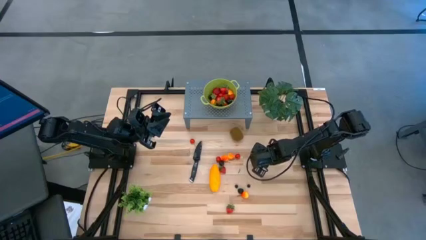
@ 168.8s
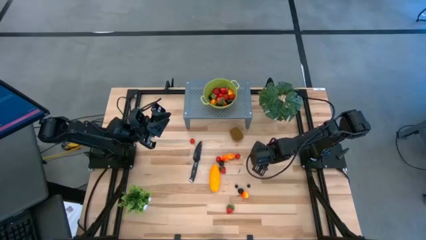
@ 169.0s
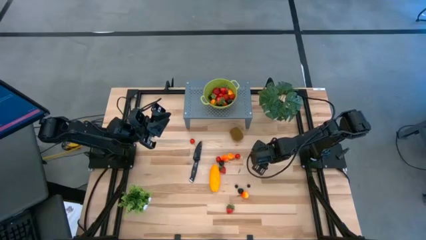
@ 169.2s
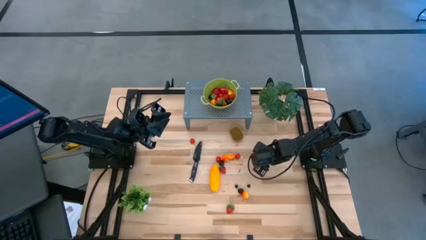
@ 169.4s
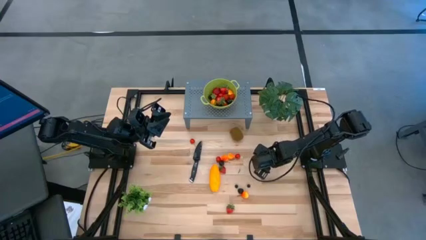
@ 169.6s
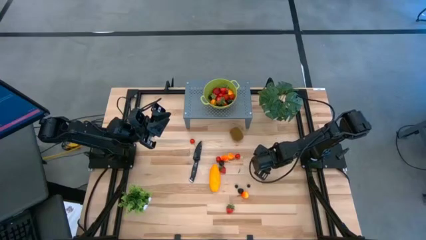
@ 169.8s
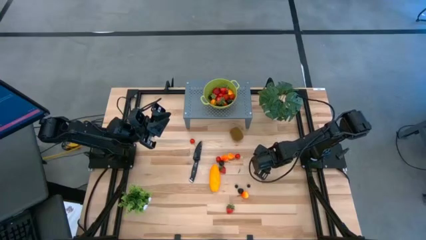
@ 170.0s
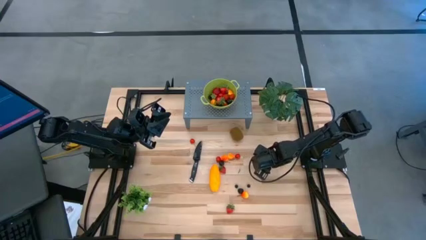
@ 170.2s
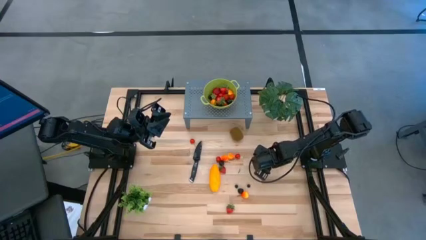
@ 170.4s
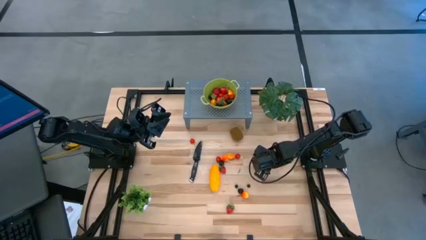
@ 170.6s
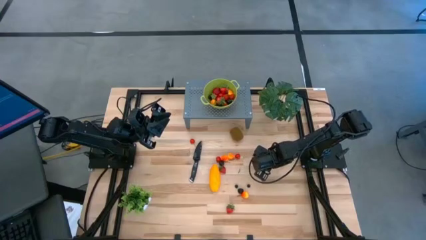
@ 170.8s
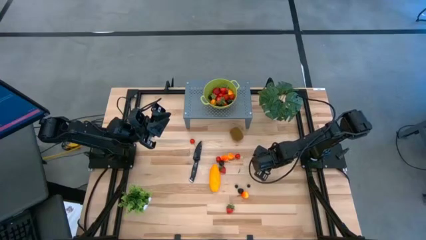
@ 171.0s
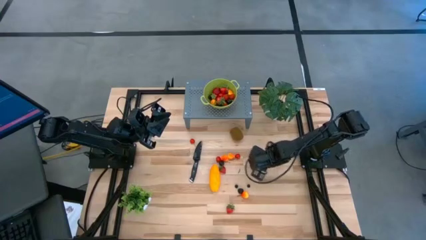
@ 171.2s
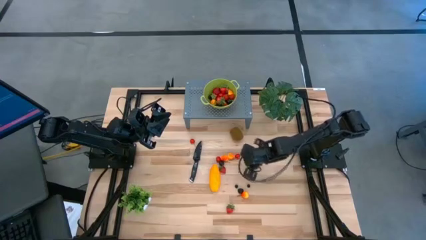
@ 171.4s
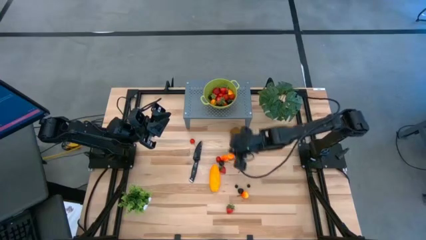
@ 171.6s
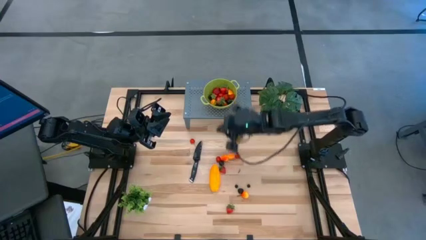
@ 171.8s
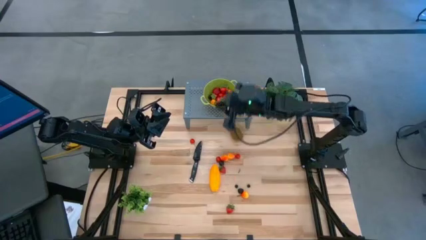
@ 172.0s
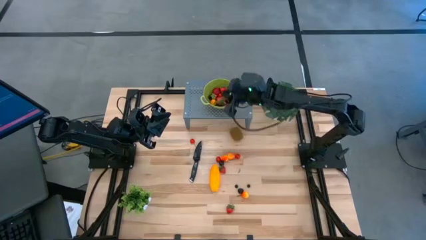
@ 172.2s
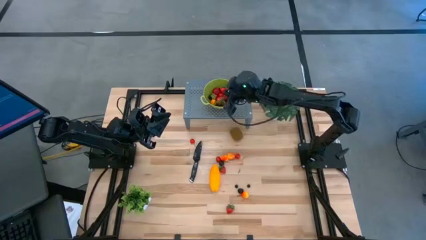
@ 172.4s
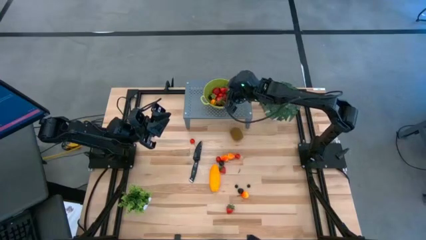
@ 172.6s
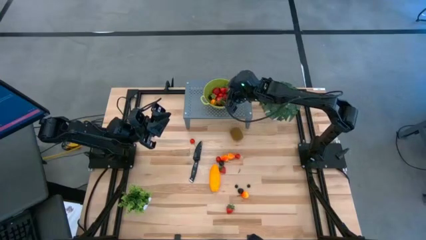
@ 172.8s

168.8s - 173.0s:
Task: Pick & Place Fruit
Put the blueberry into the green strainer bowl on the shelf

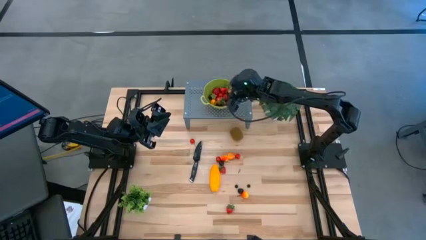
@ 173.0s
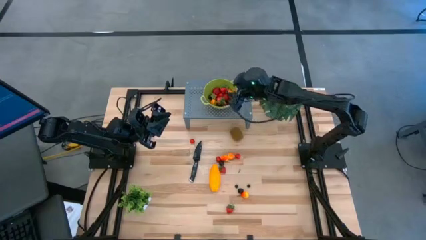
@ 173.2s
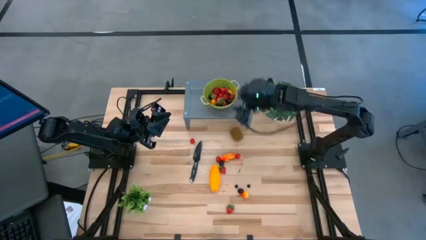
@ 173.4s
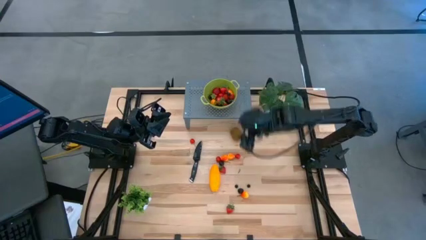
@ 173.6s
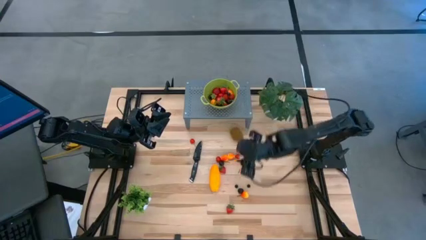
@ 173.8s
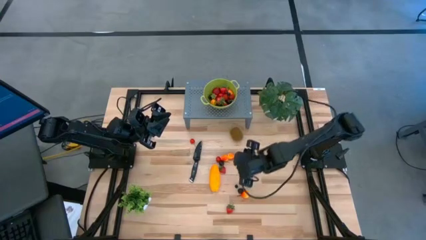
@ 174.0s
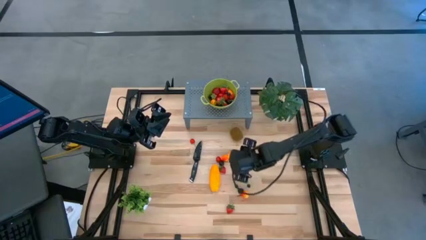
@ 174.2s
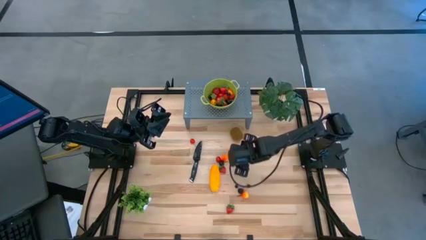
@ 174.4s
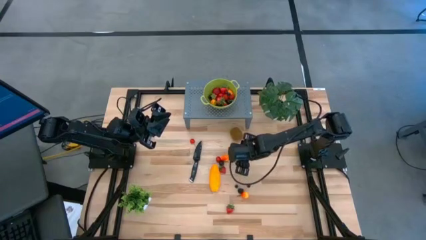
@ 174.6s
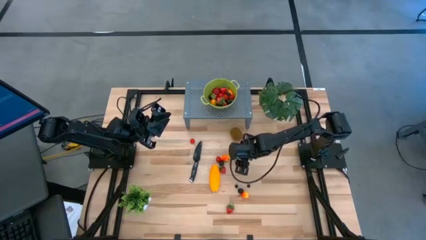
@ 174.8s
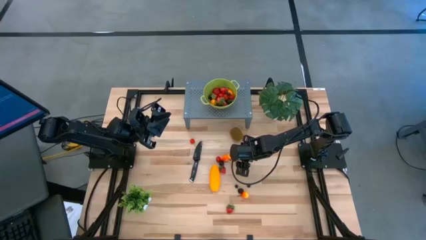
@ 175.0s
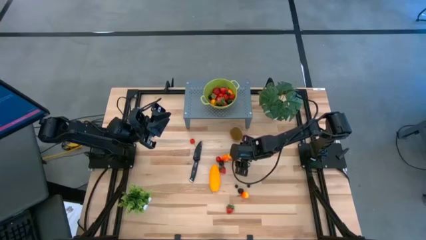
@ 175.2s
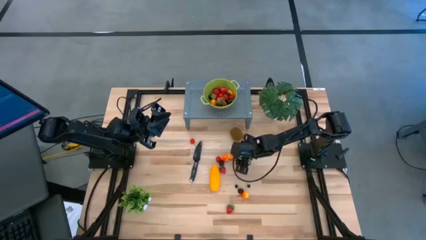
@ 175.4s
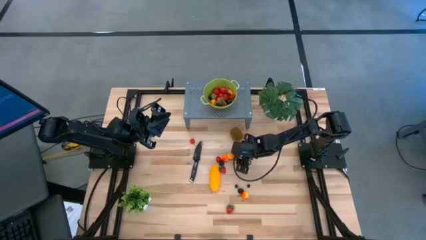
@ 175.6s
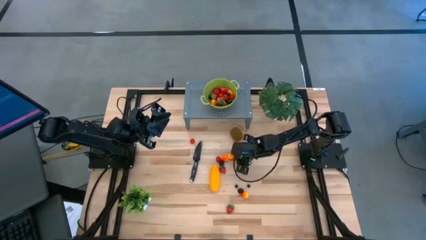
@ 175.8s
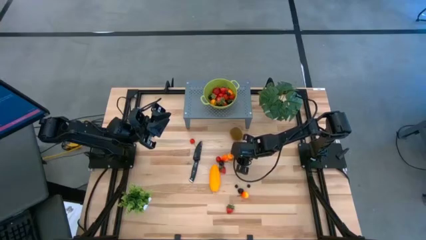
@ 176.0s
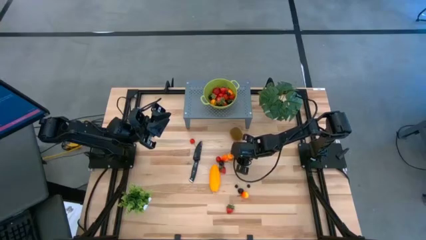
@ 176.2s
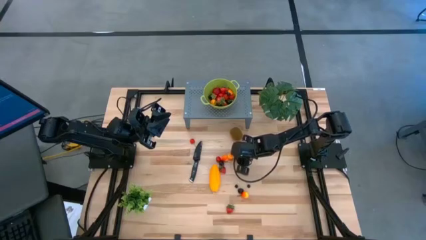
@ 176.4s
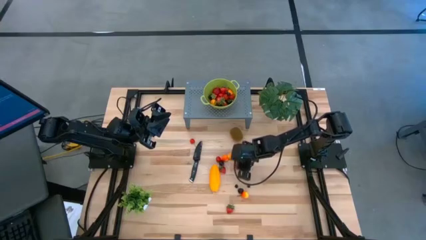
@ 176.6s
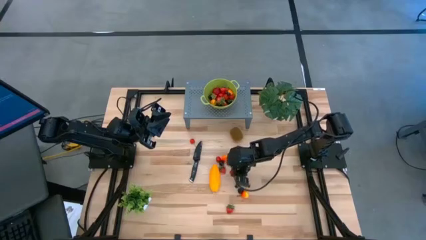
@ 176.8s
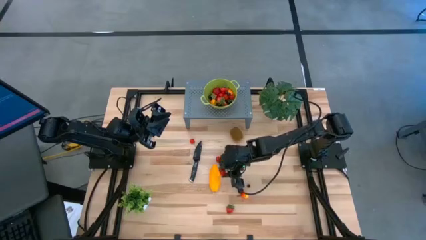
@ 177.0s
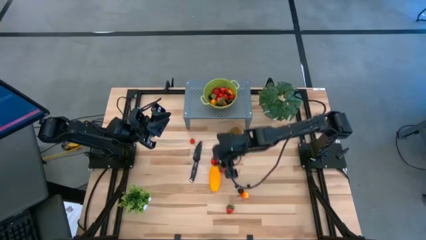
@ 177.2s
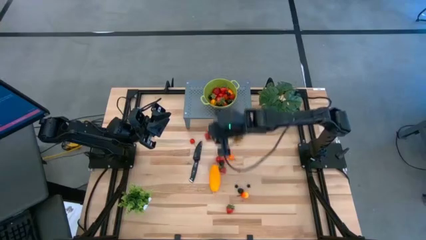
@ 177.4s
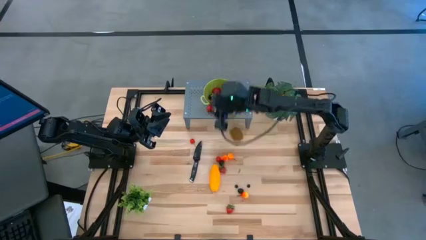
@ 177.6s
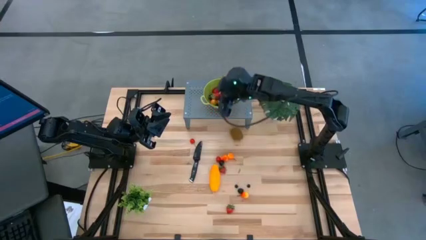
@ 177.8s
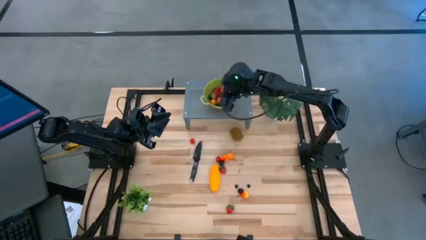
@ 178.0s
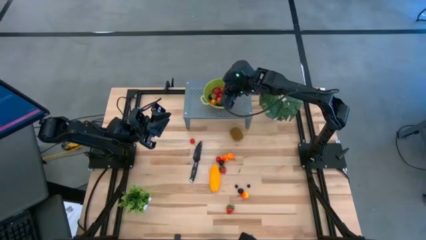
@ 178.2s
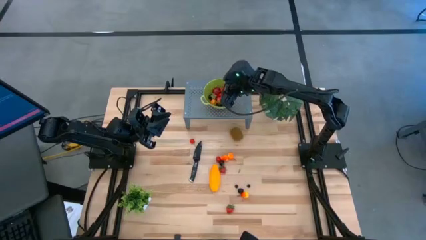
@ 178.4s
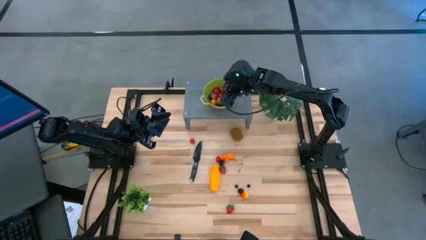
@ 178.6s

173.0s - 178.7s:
Put the red cherry into the green strainer bowl on the shelf

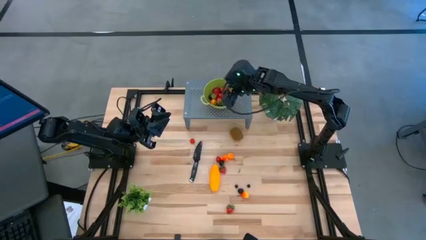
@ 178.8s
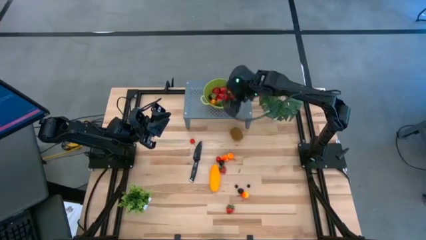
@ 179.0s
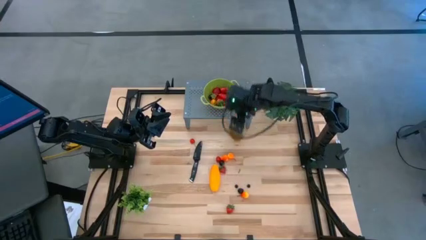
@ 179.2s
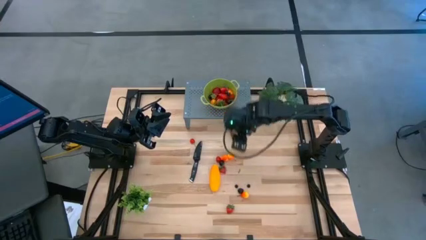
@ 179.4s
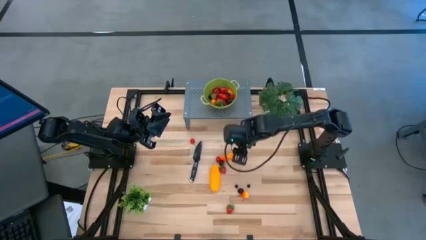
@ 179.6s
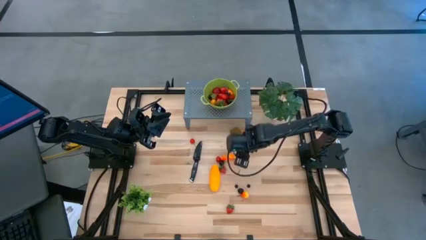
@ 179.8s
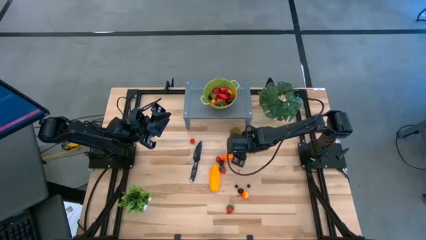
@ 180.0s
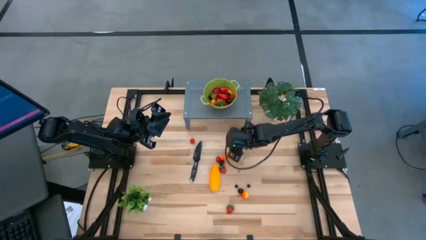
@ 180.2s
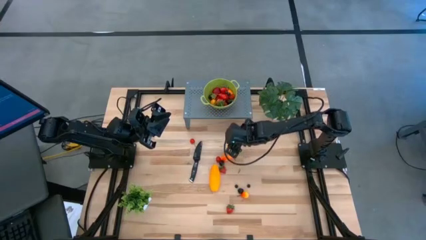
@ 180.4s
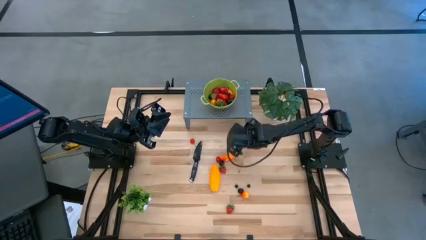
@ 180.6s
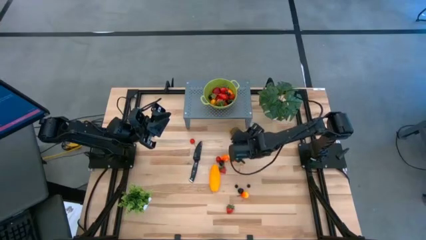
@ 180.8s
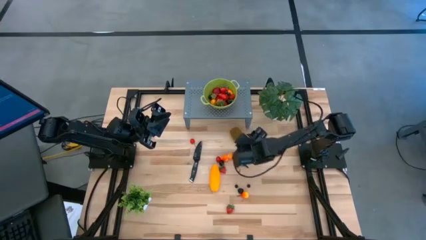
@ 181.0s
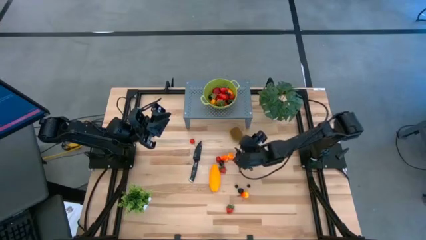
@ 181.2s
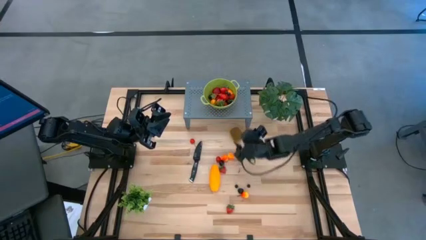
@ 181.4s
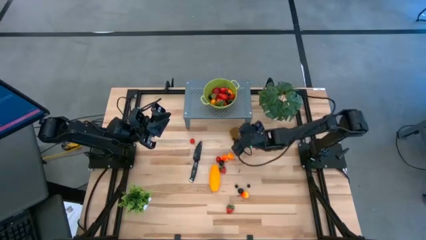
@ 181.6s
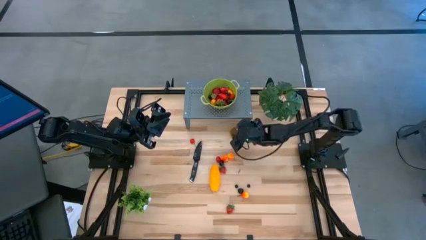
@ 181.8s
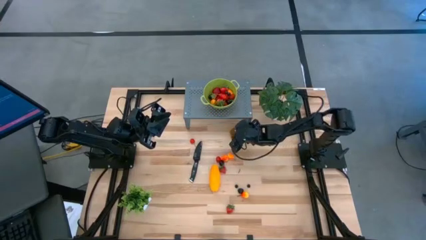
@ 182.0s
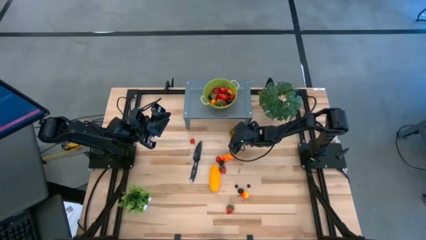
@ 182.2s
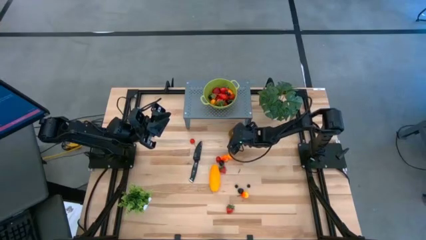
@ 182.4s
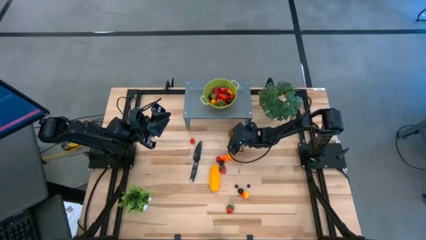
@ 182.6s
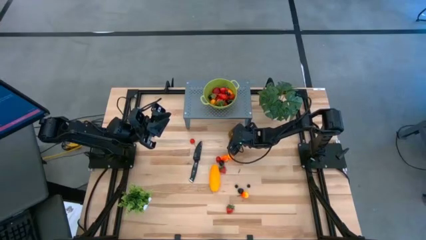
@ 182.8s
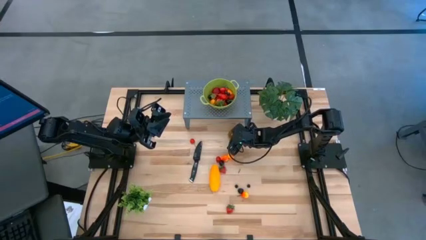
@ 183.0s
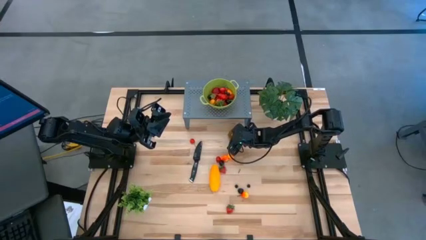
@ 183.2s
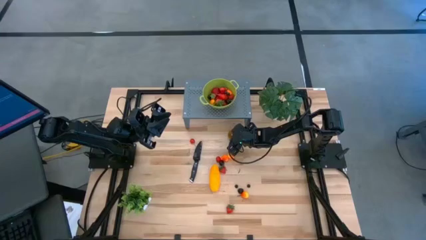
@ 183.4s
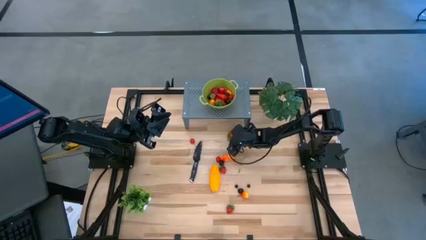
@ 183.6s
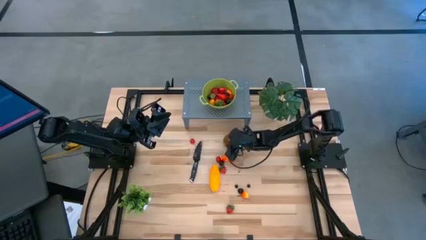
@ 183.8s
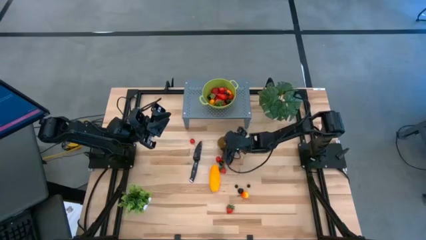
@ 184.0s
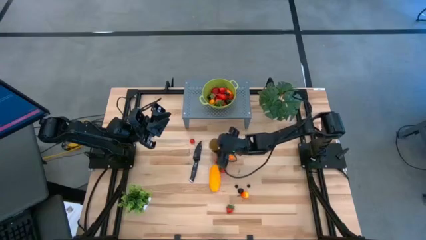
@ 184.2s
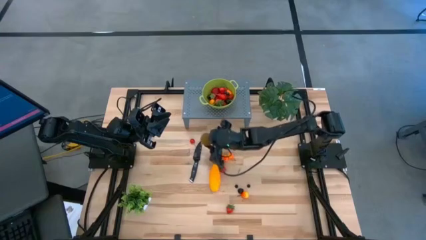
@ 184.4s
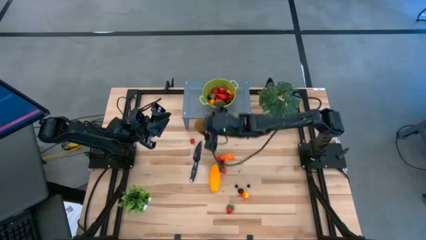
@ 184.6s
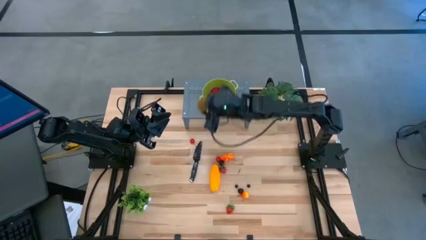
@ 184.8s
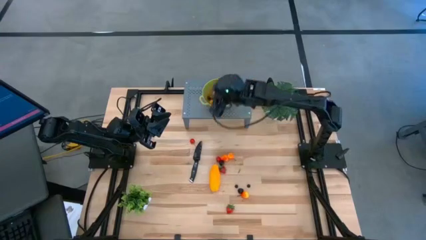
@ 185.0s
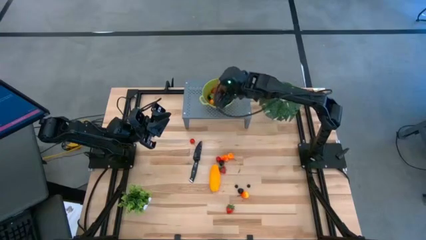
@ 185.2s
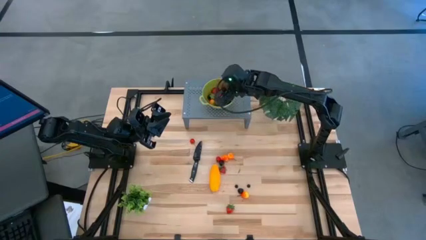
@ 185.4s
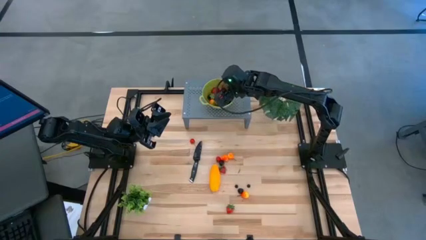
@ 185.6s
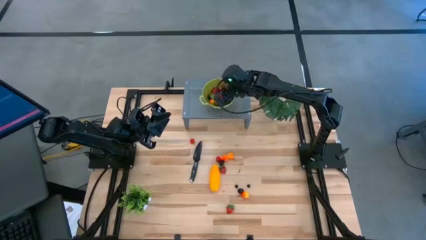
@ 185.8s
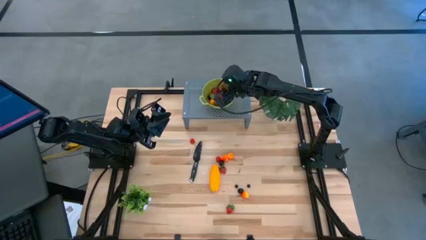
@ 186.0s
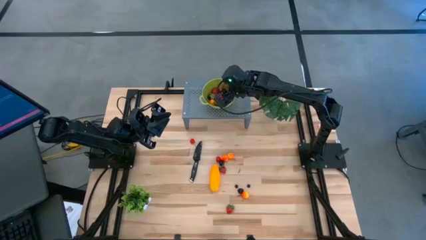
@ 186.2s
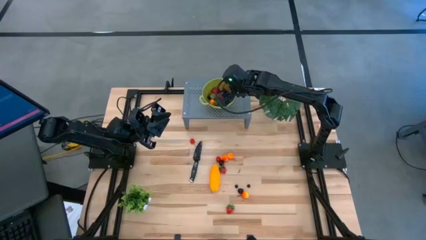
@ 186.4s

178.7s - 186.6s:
Put the kiwi into the green strainer bowl on the shelf
